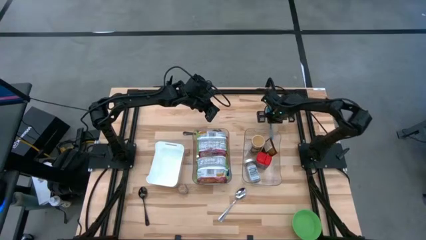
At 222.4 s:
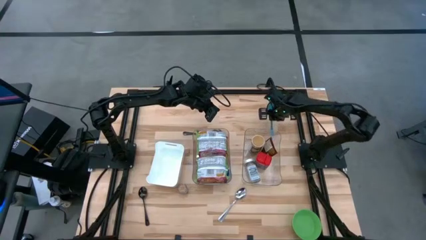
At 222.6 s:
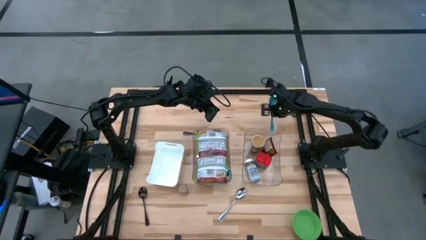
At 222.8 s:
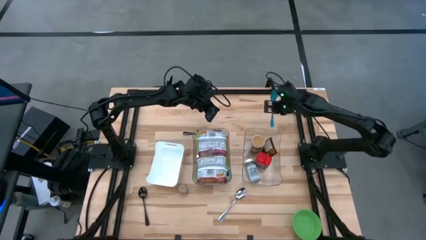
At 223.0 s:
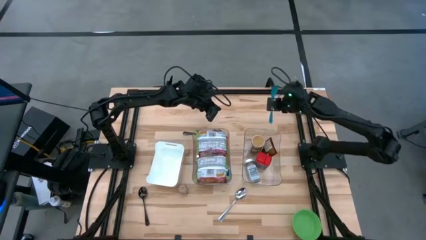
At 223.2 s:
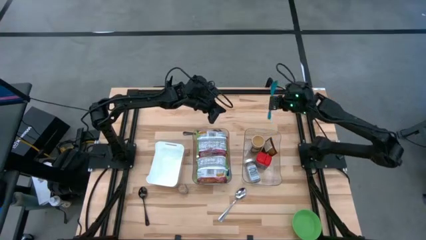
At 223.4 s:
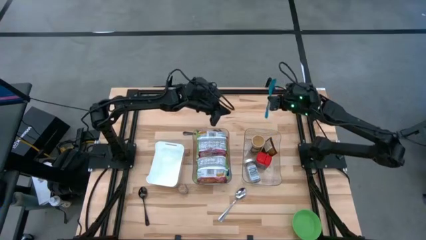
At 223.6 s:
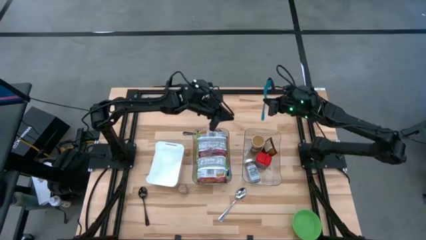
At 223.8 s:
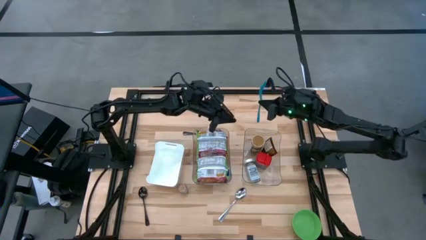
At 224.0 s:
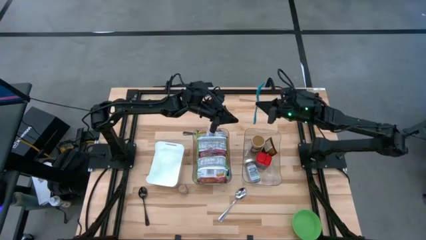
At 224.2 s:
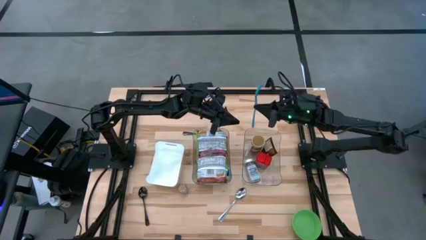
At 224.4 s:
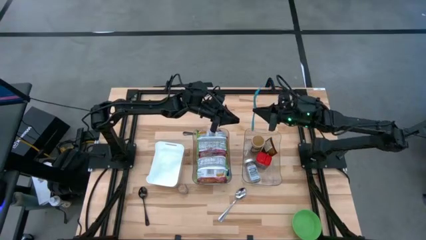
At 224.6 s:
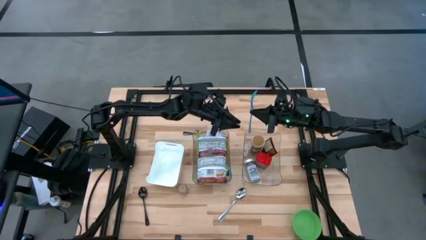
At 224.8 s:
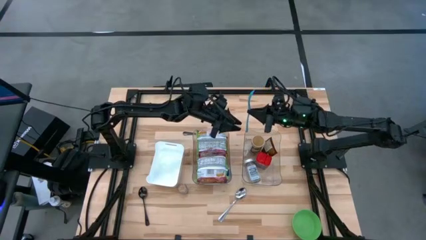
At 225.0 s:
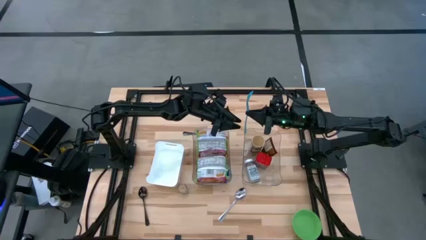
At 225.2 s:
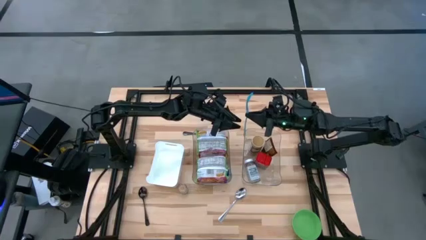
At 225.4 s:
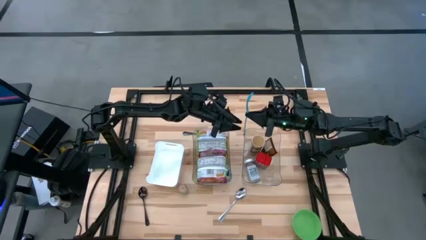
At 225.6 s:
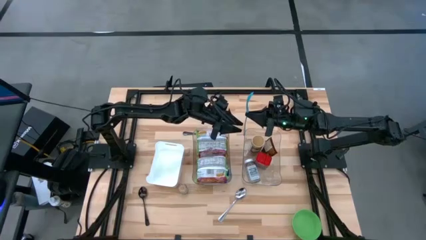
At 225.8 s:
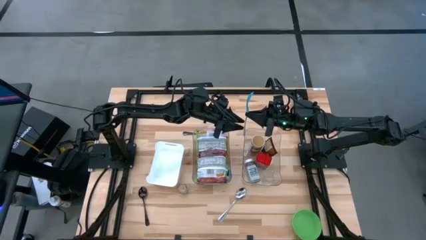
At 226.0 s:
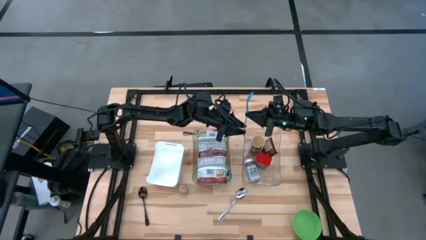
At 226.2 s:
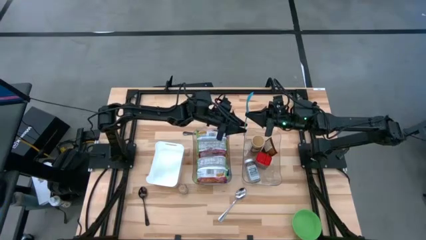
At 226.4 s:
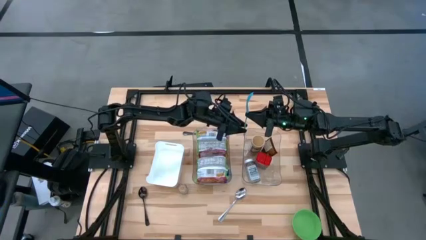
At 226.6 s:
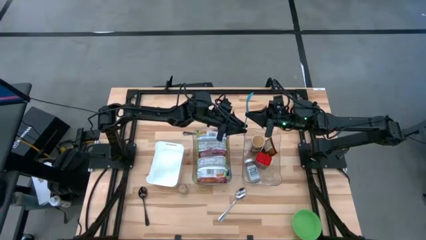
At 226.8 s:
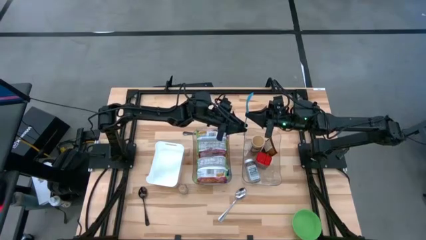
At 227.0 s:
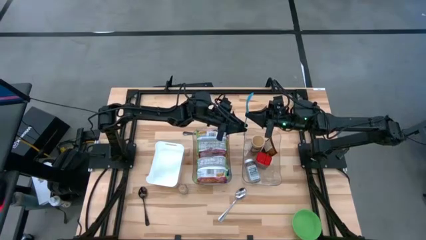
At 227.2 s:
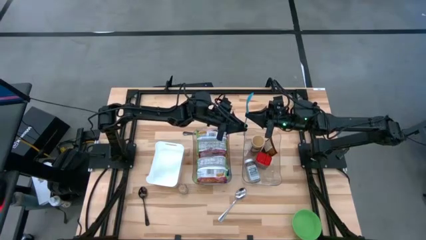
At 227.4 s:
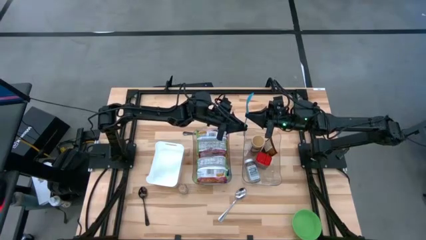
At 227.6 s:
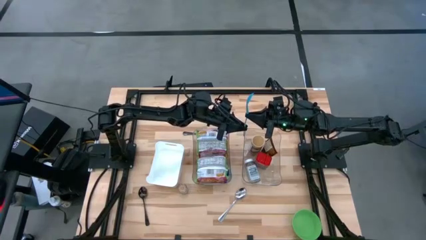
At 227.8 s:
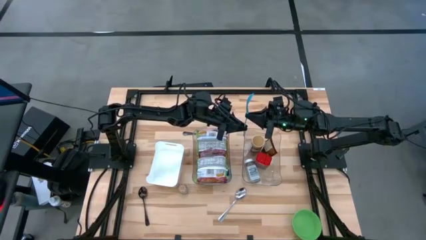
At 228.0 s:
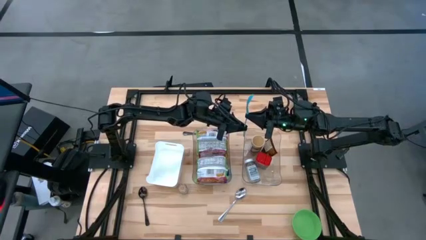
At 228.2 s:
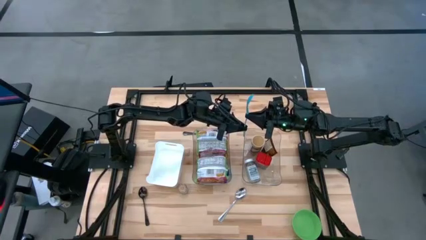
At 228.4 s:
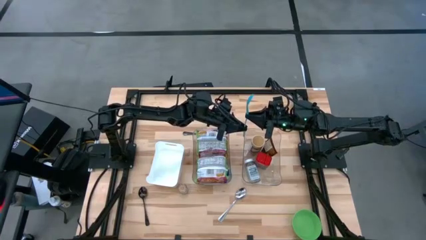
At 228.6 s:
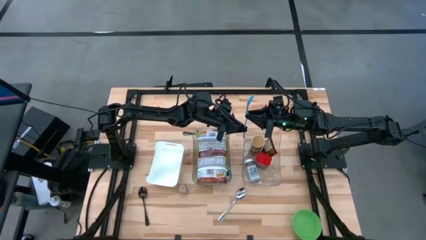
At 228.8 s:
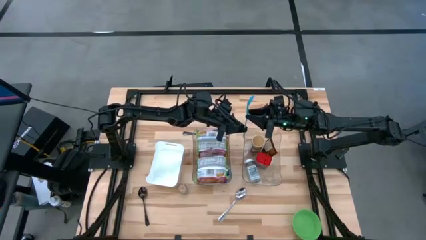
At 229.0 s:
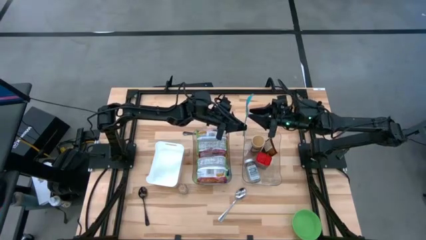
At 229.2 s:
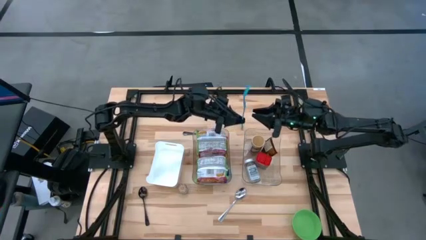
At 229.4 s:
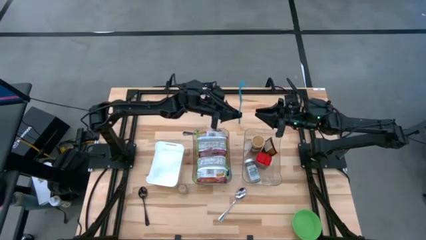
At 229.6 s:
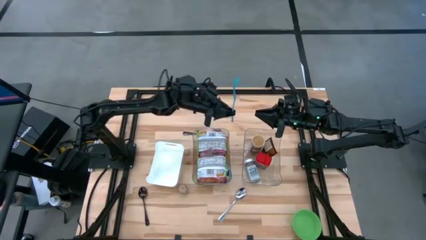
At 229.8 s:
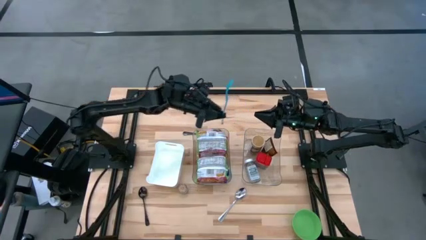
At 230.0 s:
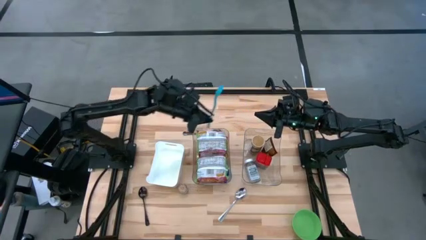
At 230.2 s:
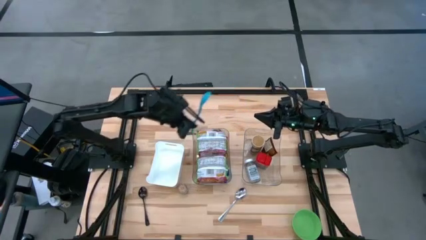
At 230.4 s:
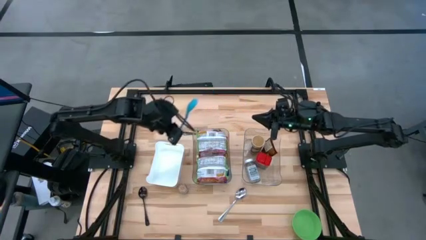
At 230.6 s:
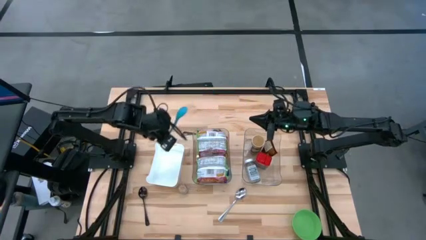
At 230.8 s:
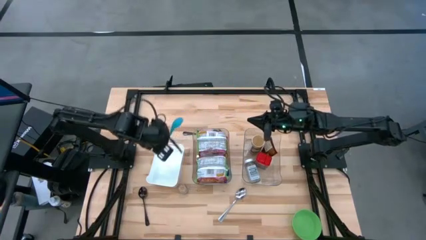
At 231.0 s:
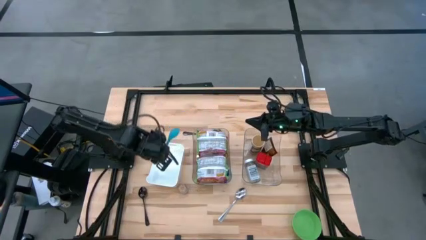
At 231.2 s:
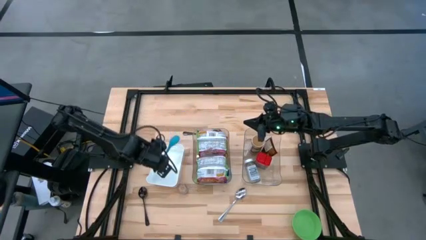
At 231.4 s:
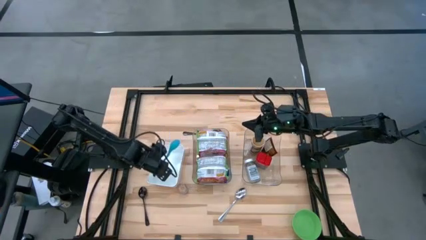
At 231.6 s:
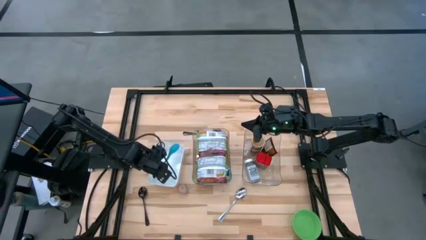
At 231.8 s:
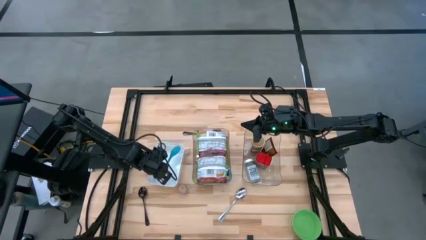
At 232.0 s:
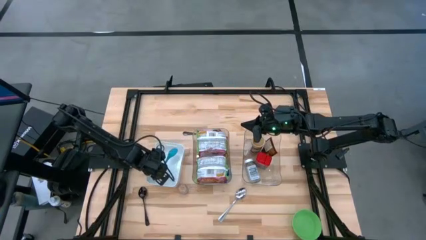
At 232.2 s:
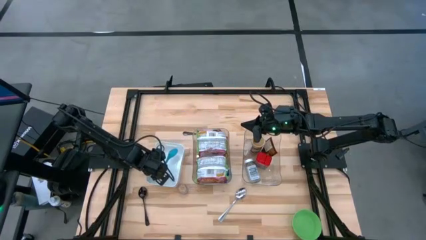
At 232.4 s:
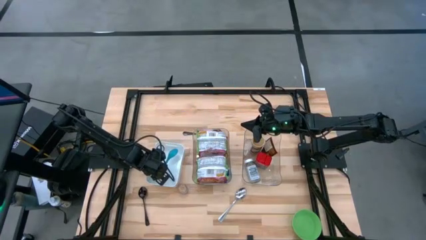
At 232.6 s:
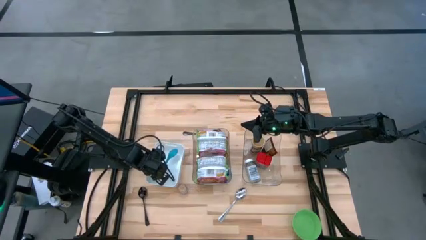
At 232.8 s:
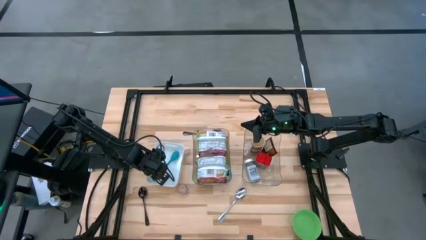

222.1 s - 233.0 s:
Task: Pick & Place Food Item
Put the blue baby spoon into the white bin
